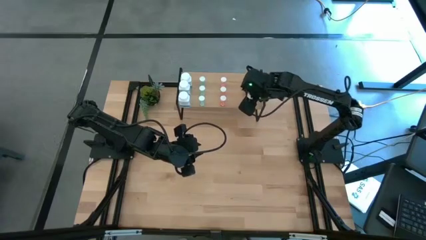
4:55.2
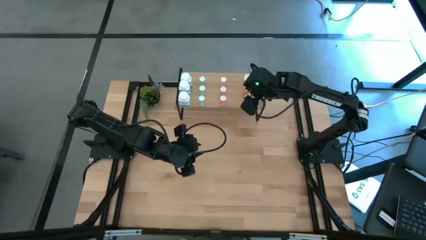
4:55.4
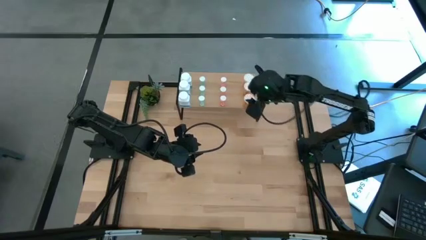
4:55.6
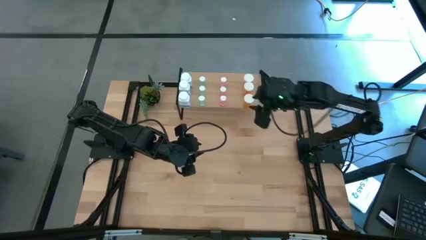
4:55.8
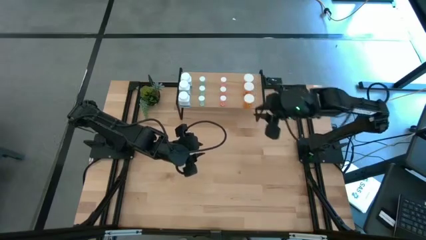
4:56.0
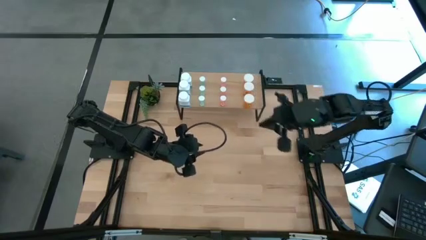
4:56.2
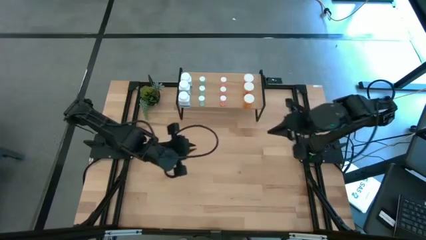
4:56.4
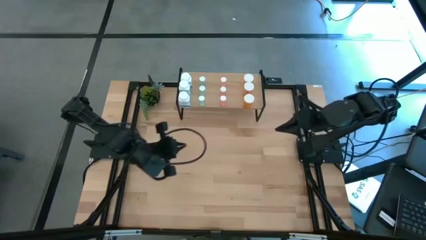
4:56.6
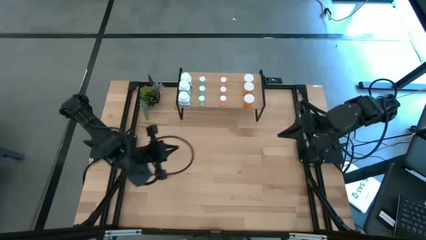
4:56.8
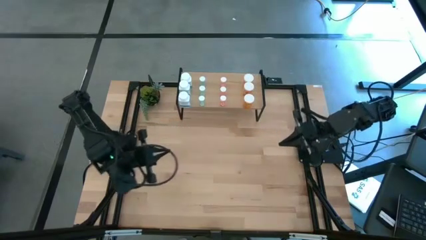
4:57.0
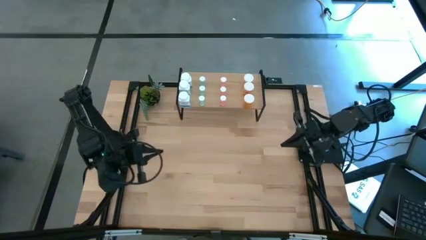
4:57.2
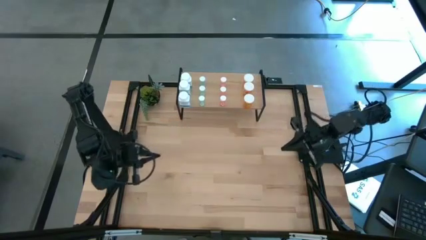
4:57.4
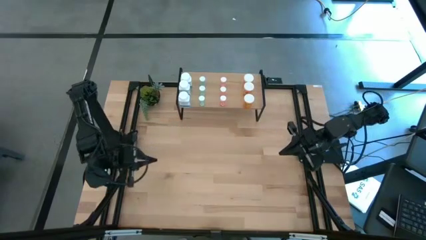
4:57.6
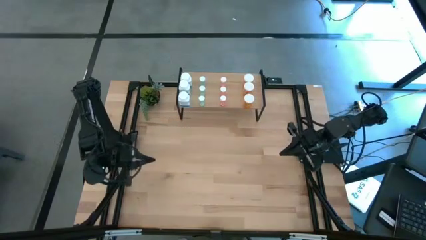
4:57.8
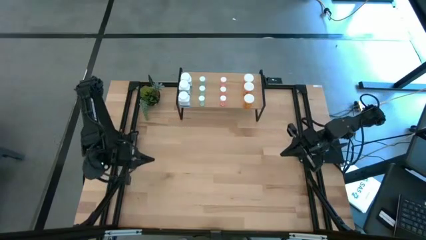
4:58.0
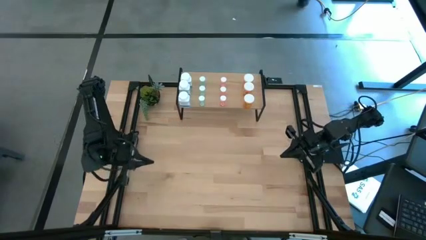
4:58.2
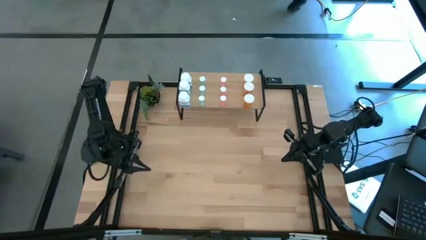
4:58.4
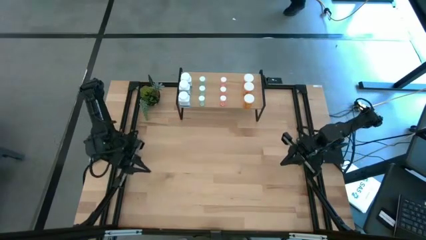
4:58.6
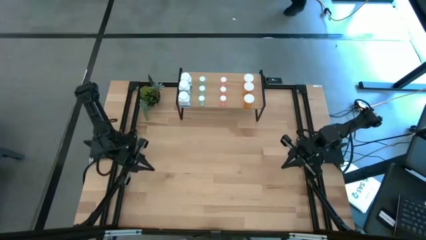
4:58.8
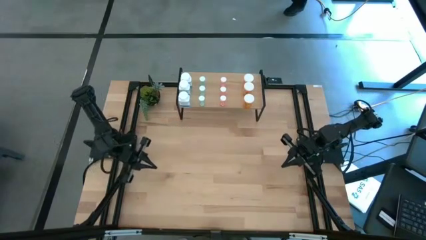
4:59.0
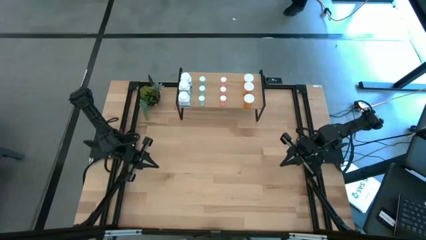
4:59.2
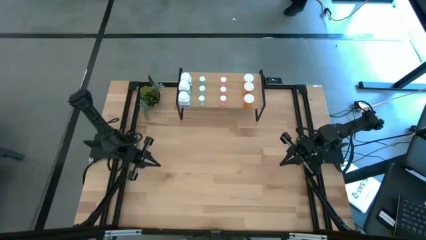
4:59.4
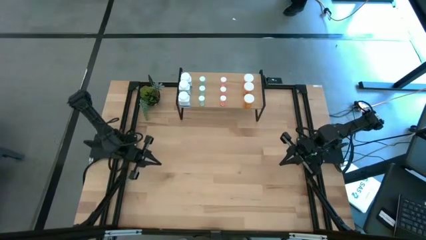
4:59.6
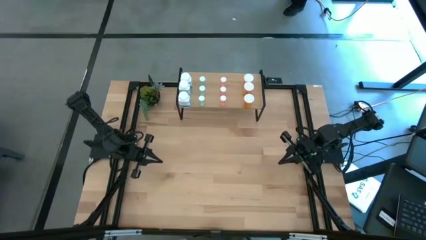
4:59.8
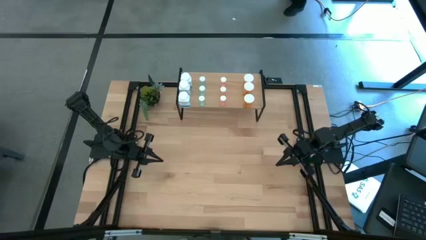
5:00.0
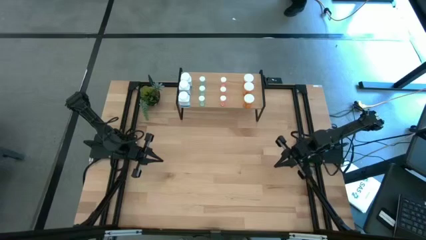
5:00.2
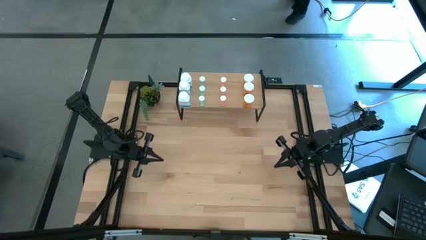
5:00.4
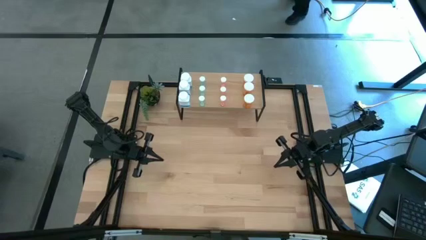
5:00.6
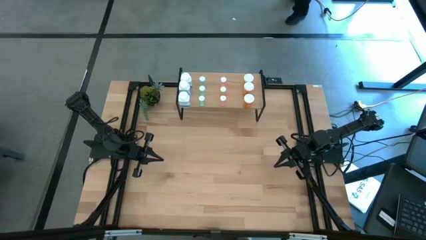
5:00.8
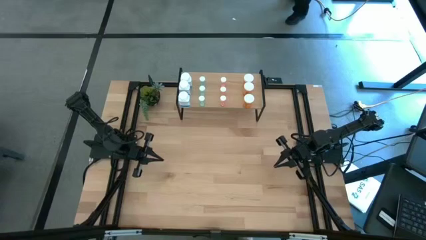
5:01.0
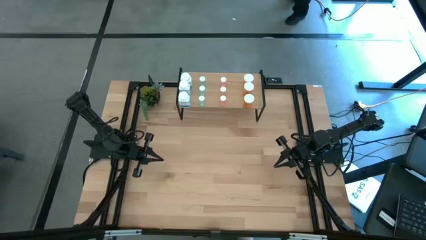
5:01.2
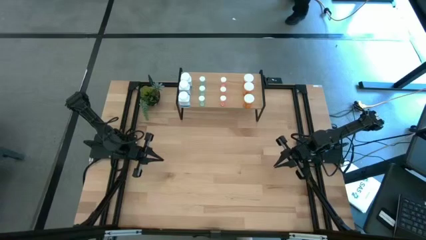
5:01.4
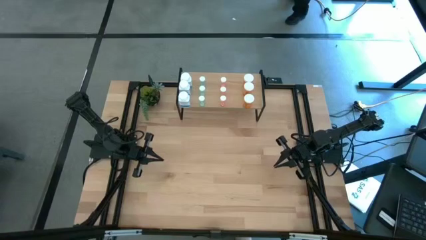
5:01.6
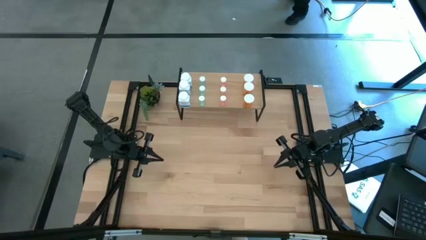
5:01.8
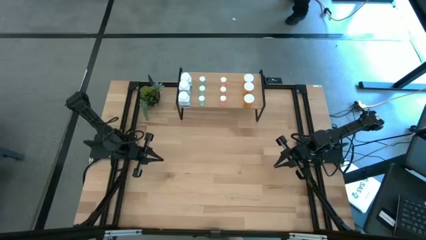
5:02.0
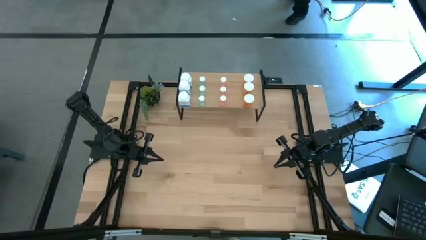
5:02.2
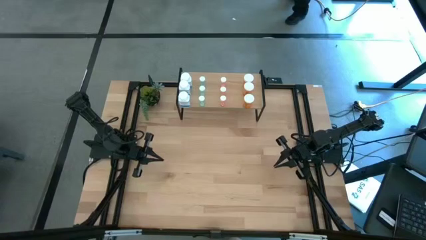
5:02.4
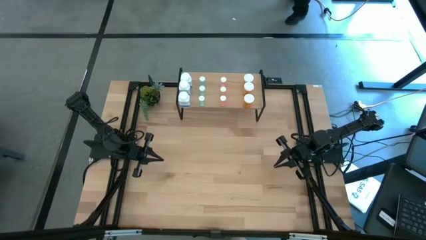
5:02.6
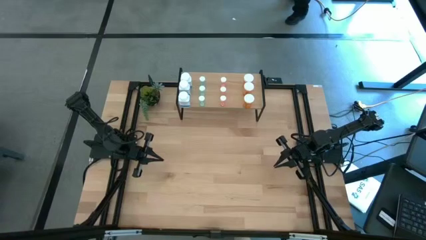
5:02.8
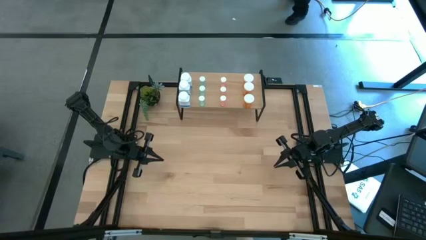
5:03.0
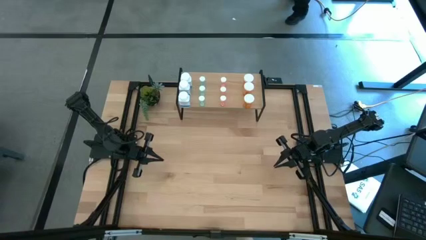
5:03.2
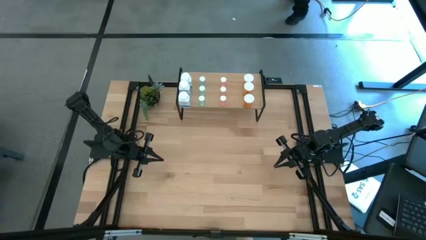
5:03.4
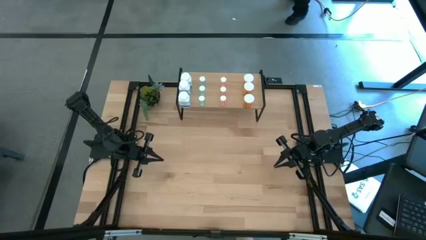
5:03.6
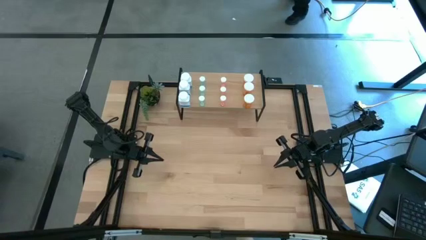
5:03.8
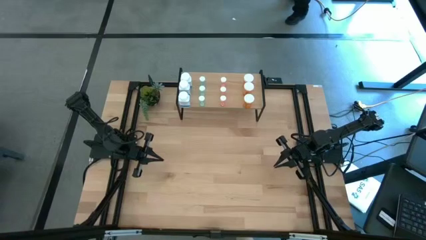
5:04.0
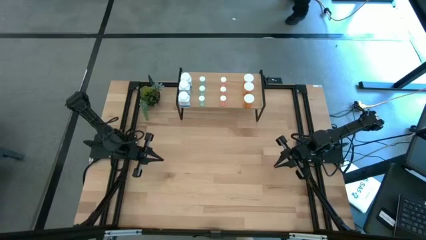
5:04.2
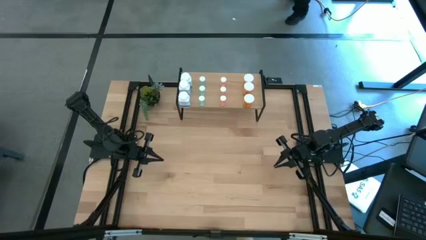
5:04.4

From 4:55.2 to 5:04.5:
Task: Pick and place medicine bottles onto shelf by color
Return to Home Position

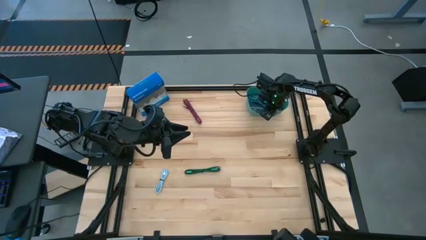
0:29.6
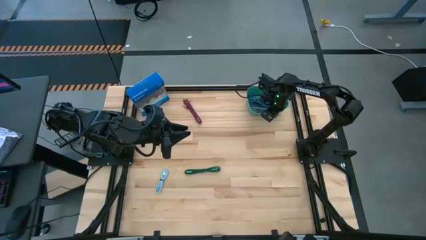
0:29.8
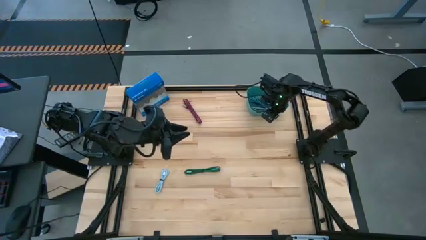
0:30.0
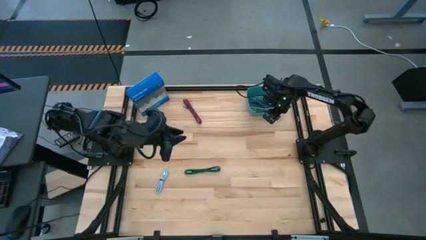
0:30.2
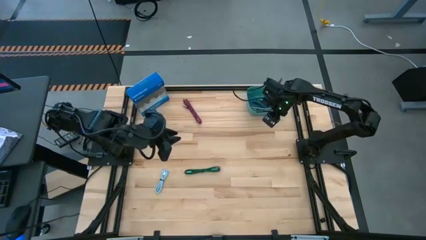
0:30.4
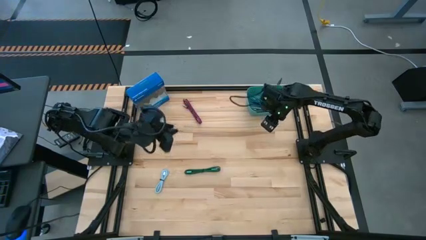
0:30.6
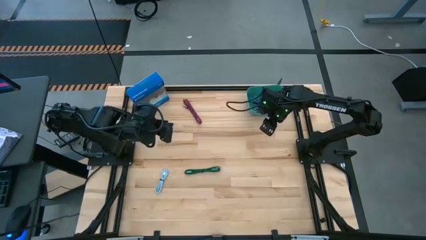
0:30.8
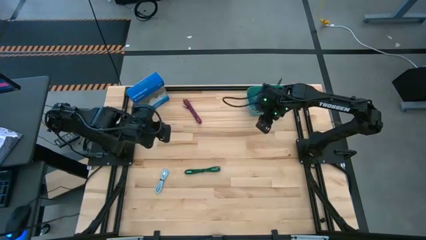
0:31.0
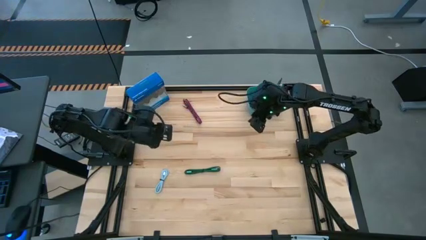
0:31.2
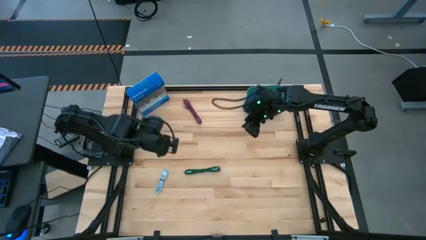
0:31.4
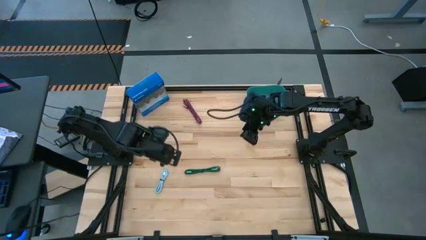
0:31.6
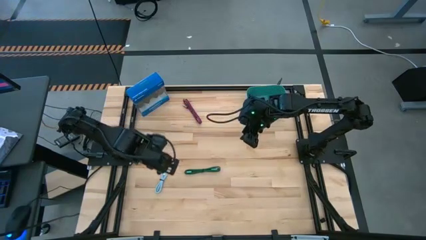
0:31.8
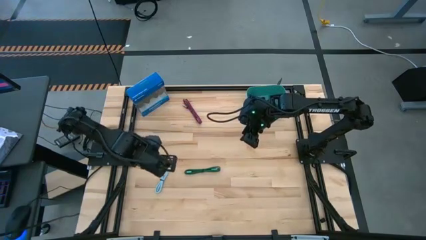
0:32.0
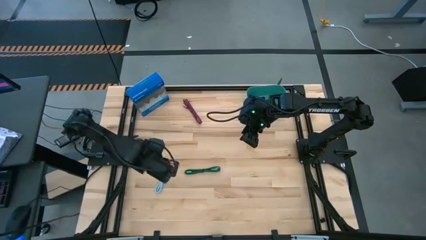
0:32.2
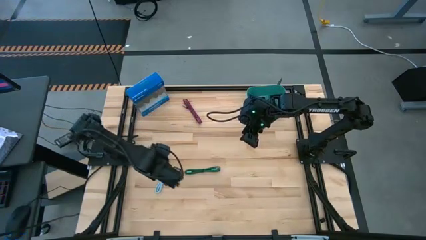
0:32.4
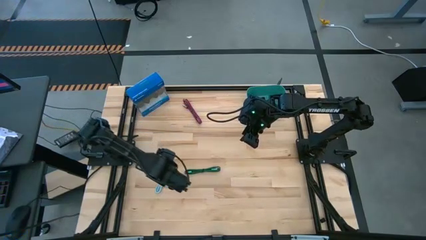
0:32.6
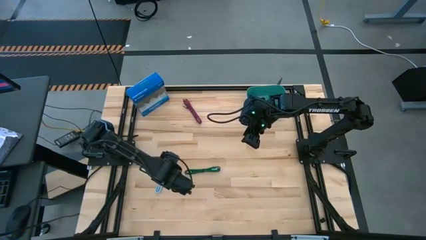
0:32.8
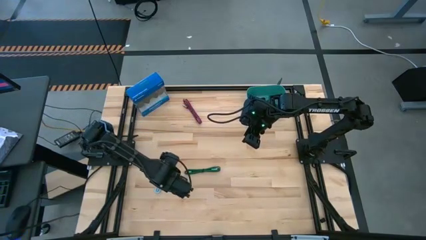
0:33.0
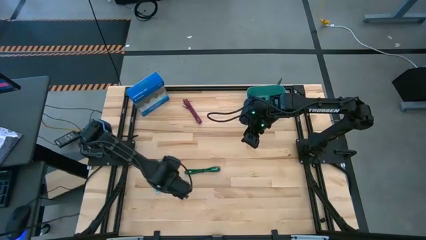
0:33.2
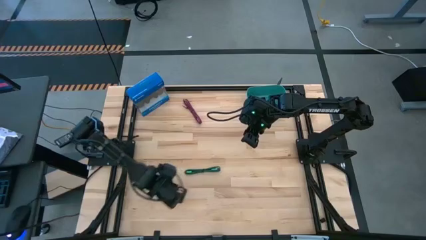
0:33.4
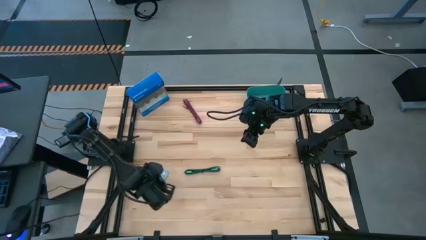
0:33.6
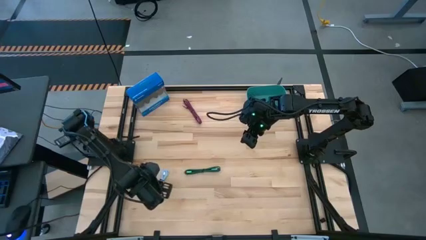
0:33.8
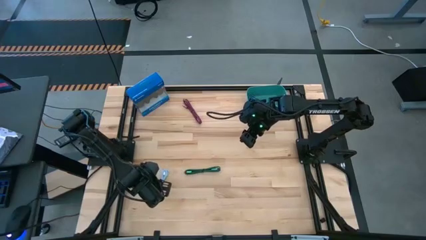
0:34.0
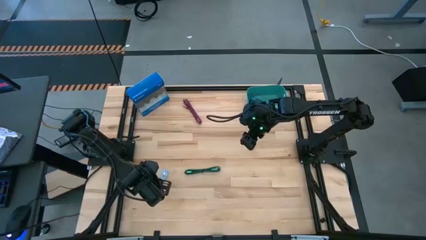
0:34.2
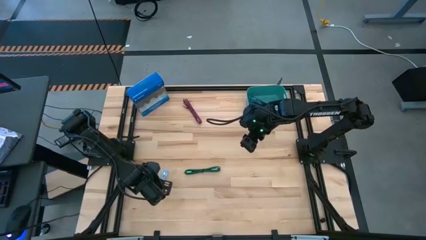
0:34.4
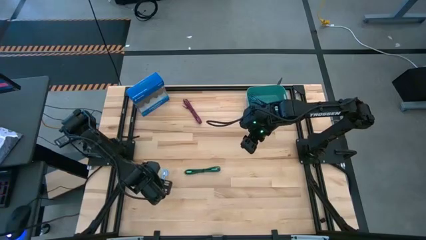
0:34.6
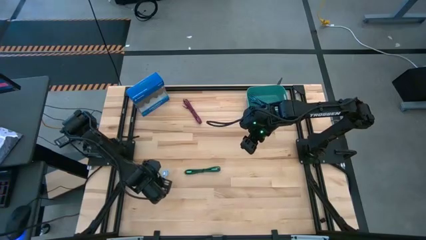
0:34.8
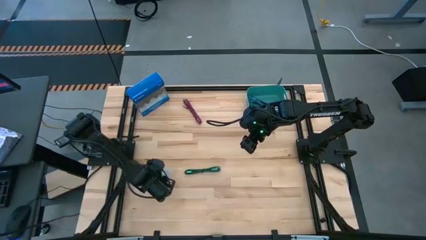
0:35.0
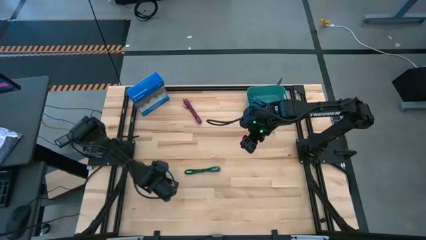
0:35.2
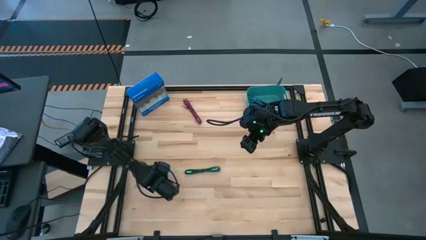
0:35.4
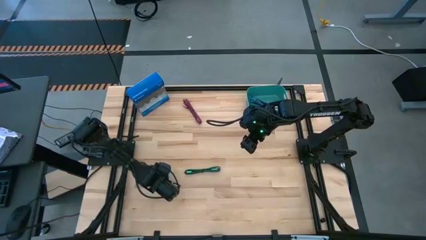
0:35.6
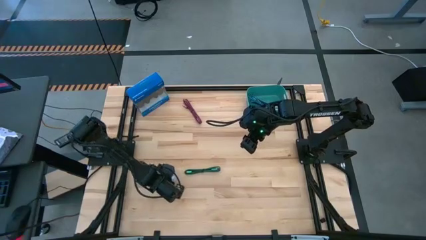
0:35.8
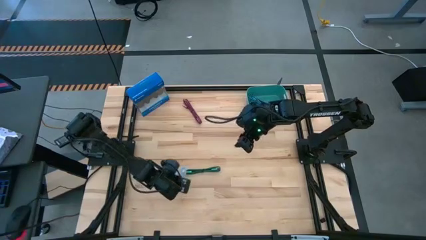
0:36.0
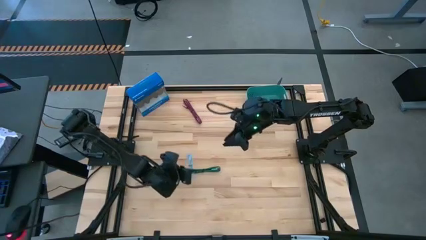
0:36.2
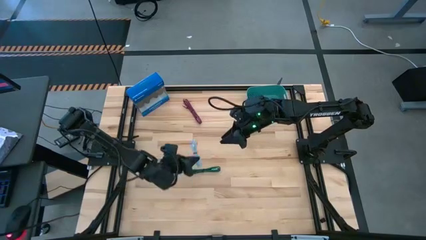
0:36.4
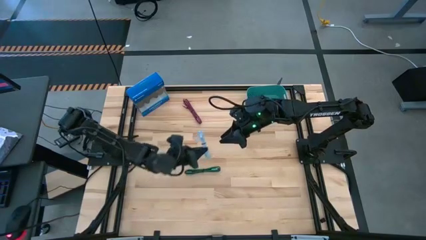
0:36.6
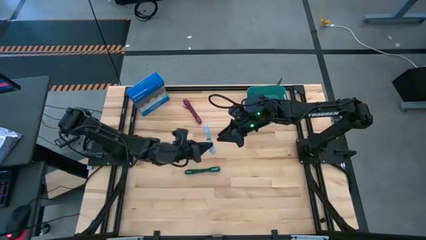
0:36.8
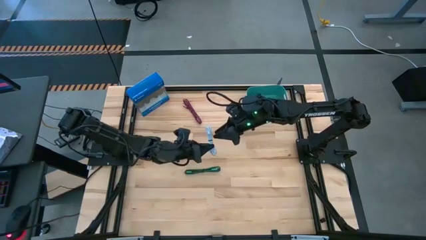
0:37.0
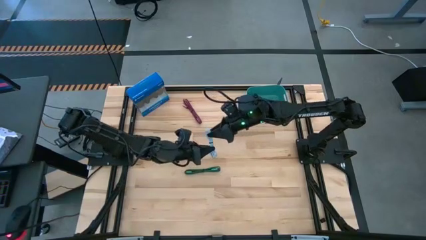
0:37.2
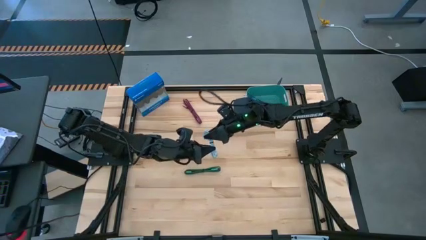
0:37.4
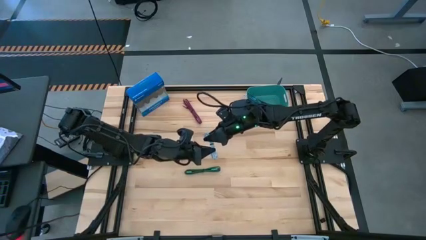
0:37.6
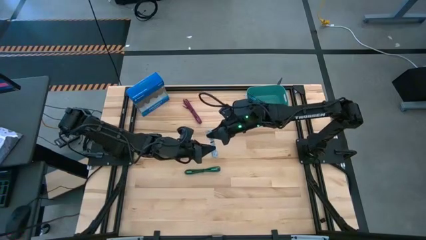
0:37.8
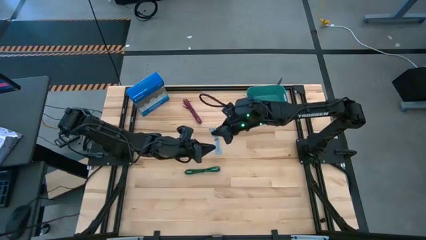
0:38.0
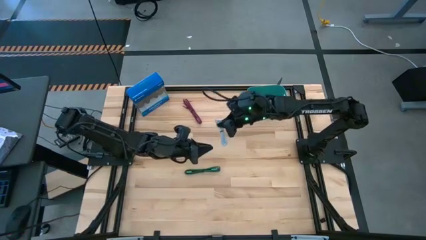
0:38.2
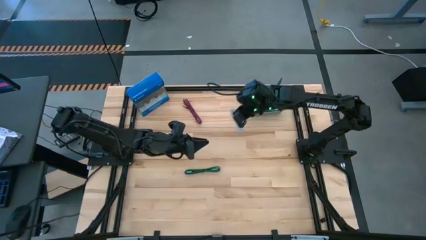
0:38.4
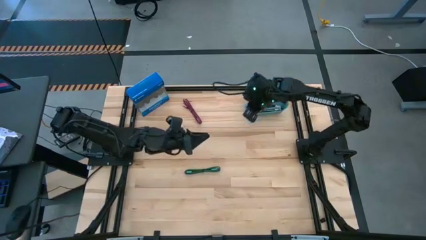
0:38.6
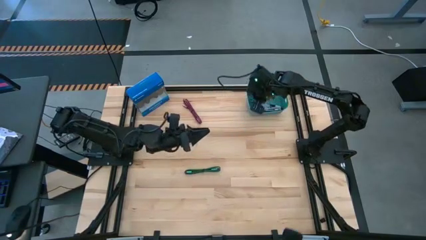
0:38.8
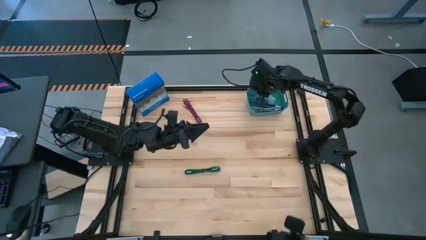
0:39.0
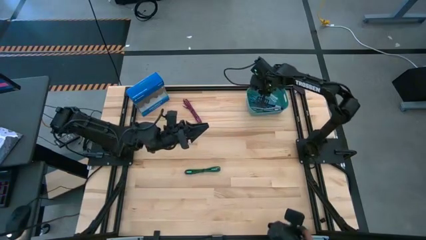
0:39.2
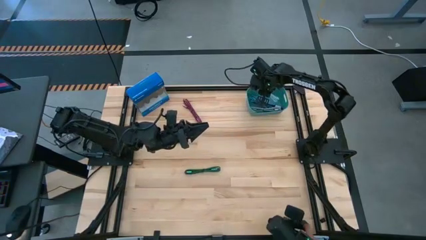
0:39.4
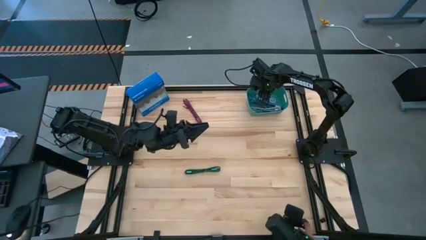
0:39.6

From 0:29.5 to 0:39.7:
Task: Pick and place USB-C Cables
Put the light blue charger cable into the green bin
